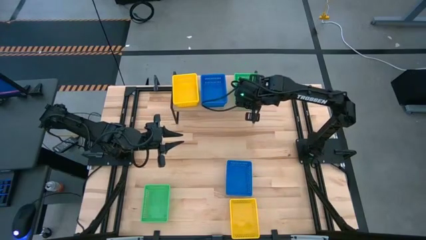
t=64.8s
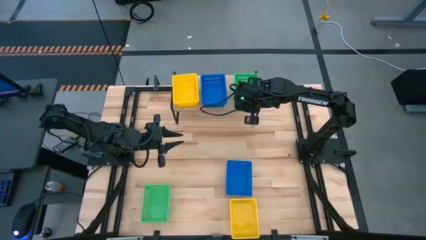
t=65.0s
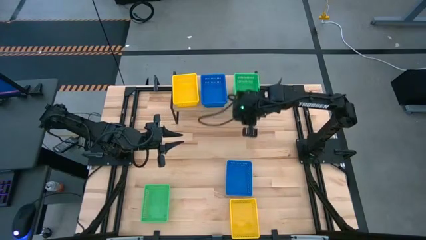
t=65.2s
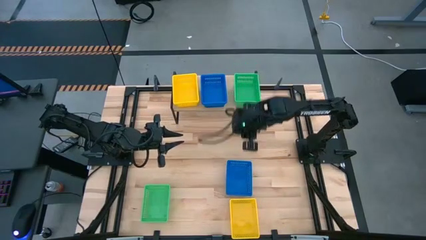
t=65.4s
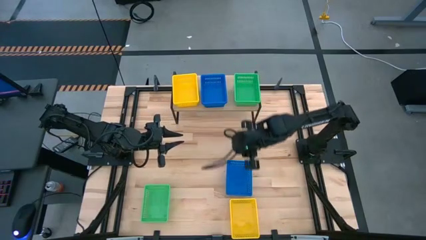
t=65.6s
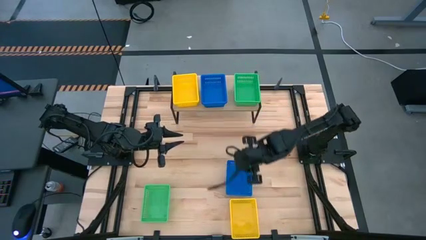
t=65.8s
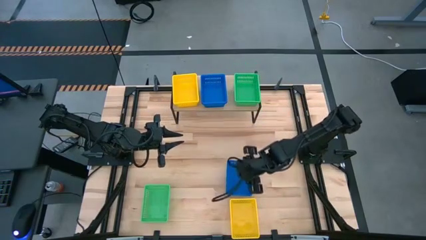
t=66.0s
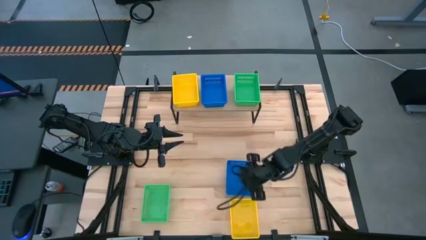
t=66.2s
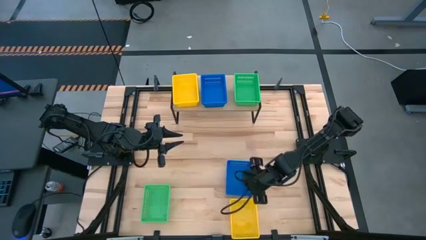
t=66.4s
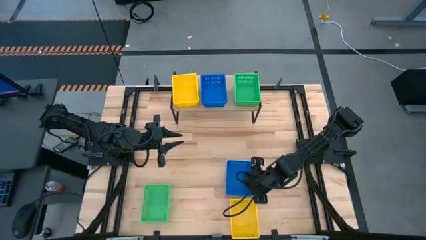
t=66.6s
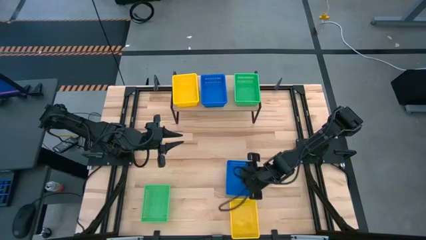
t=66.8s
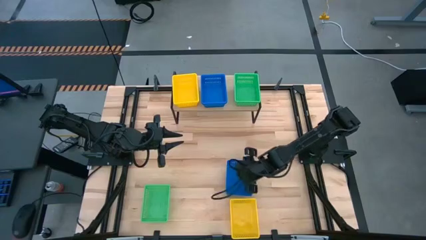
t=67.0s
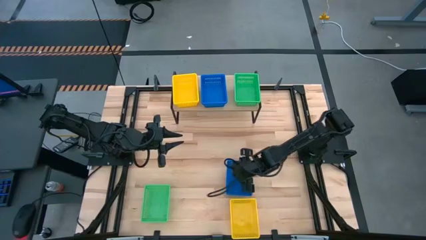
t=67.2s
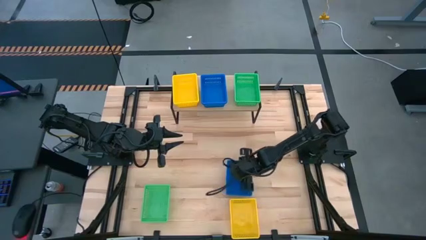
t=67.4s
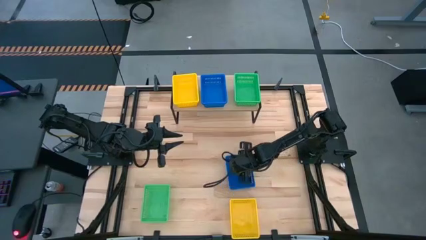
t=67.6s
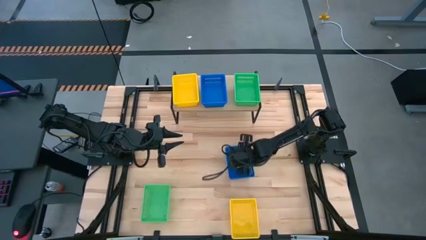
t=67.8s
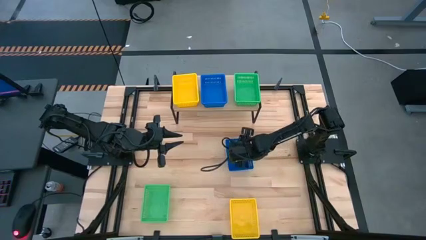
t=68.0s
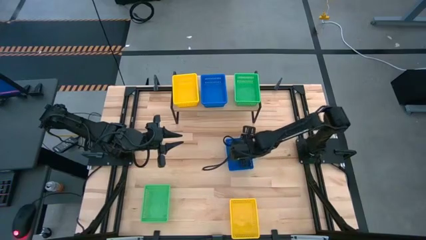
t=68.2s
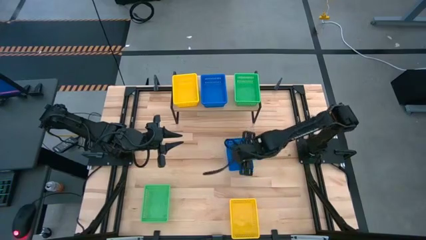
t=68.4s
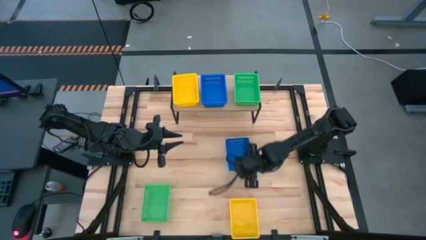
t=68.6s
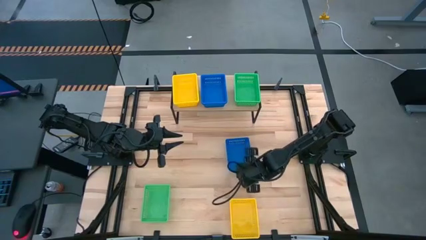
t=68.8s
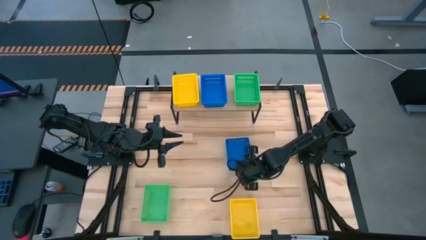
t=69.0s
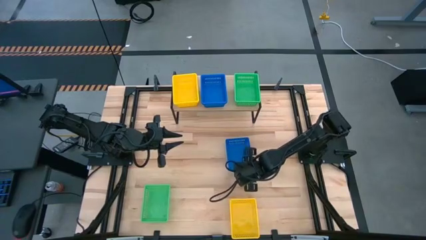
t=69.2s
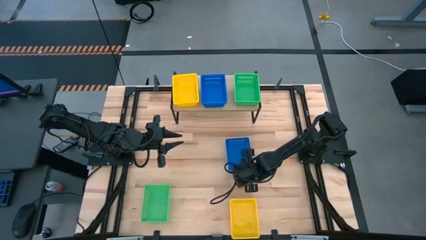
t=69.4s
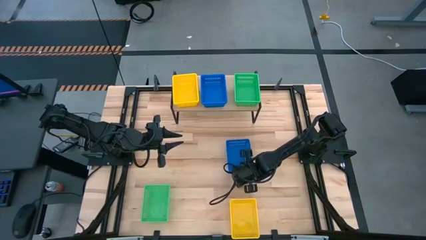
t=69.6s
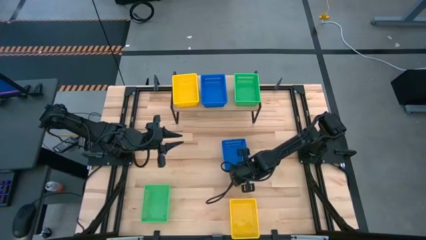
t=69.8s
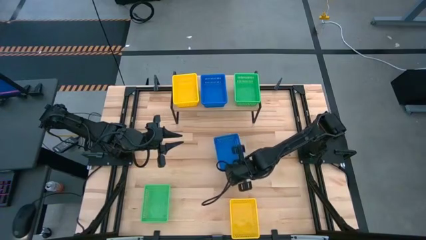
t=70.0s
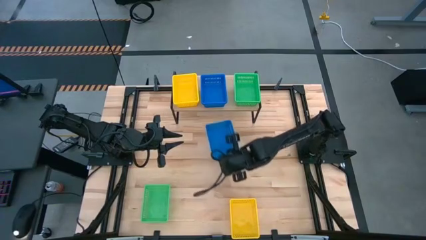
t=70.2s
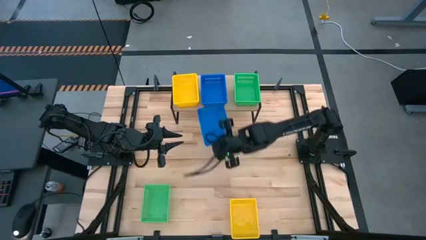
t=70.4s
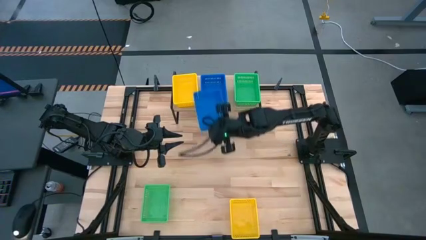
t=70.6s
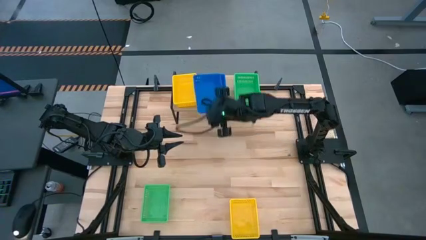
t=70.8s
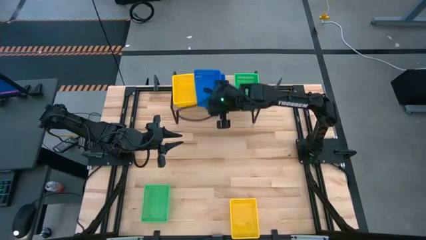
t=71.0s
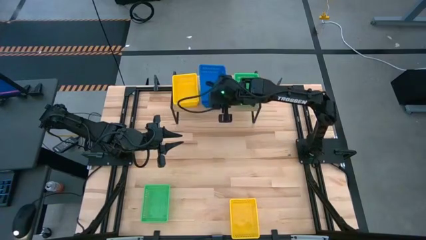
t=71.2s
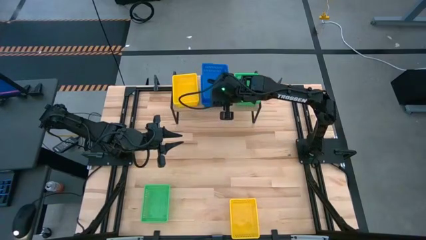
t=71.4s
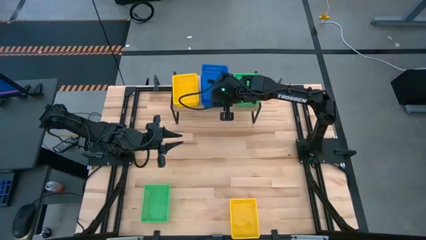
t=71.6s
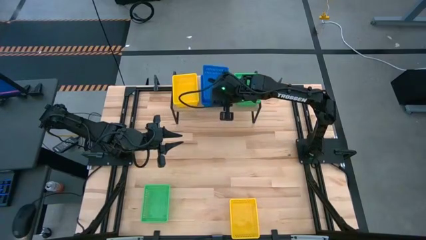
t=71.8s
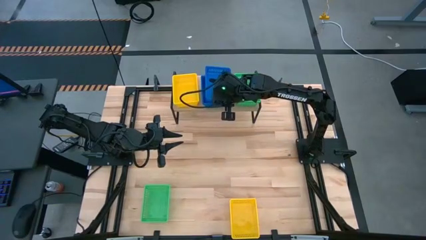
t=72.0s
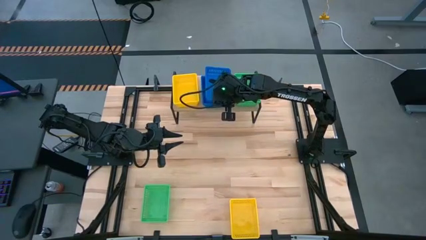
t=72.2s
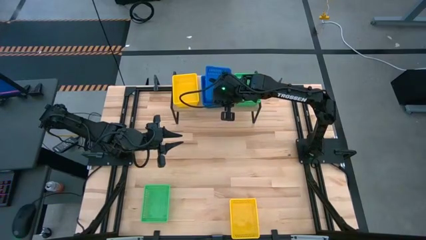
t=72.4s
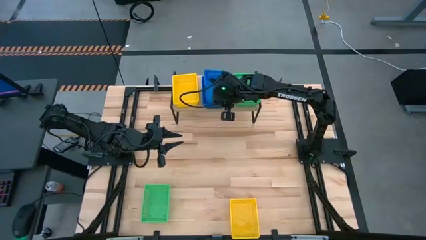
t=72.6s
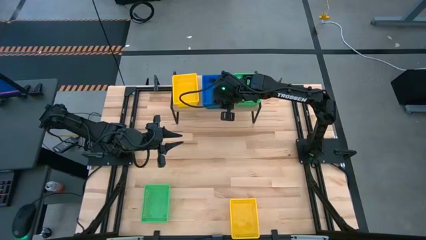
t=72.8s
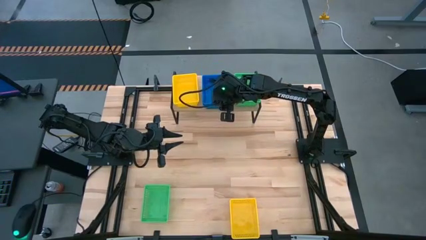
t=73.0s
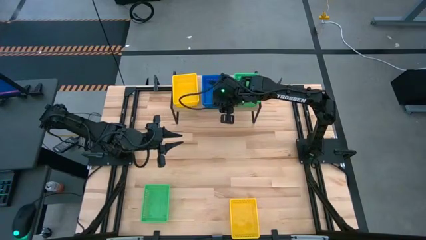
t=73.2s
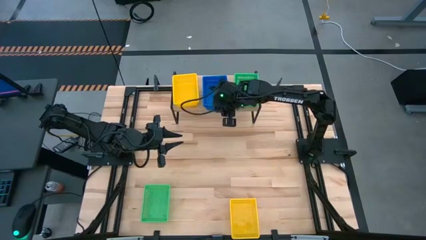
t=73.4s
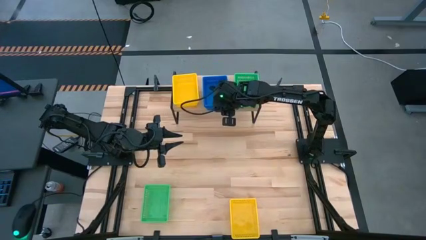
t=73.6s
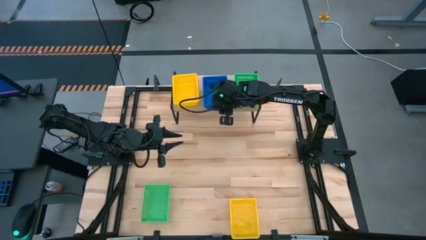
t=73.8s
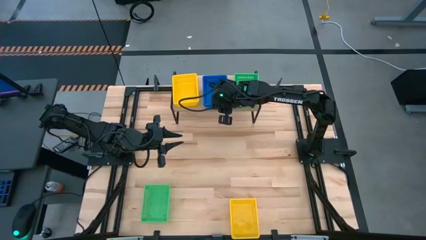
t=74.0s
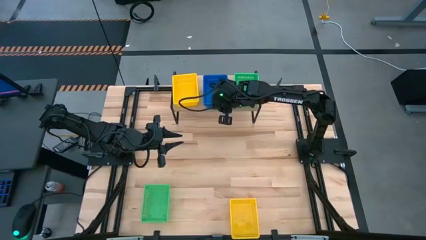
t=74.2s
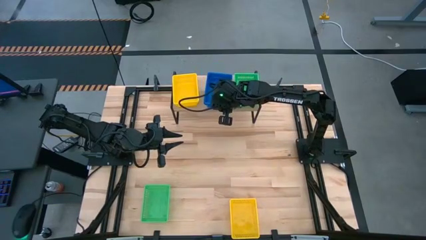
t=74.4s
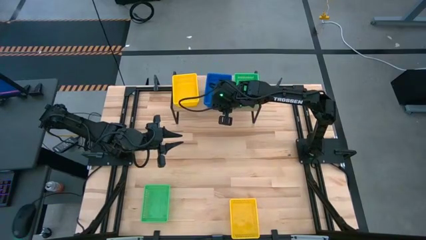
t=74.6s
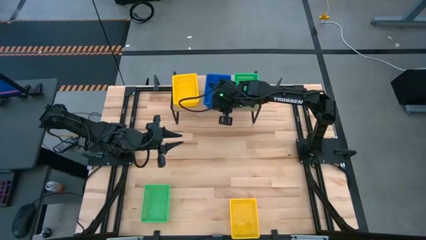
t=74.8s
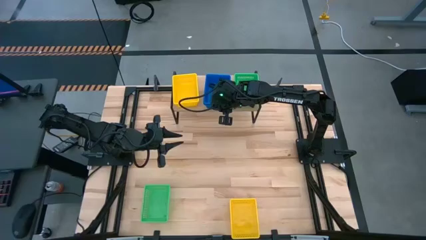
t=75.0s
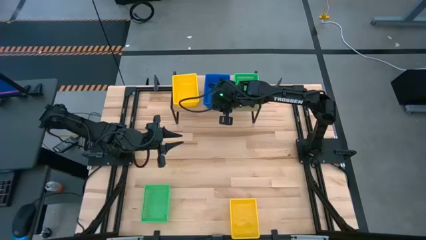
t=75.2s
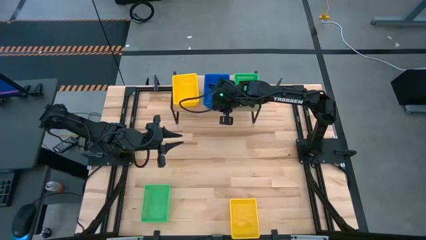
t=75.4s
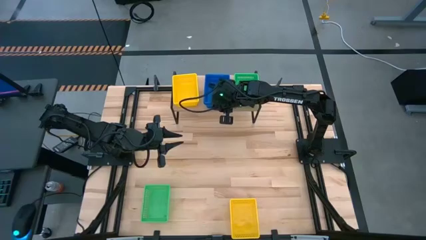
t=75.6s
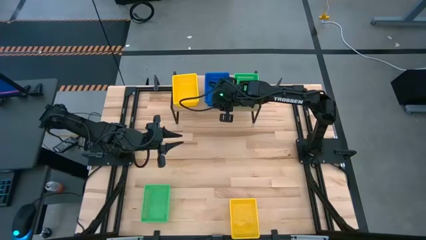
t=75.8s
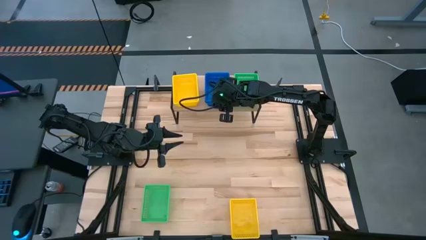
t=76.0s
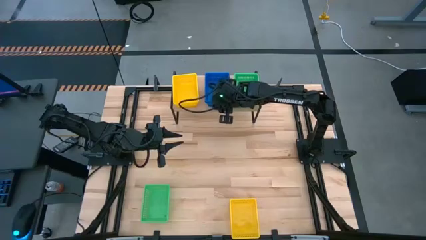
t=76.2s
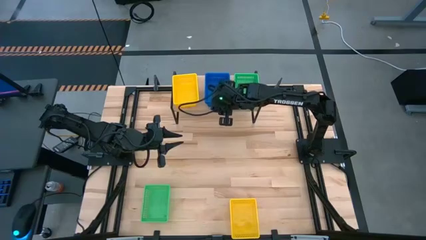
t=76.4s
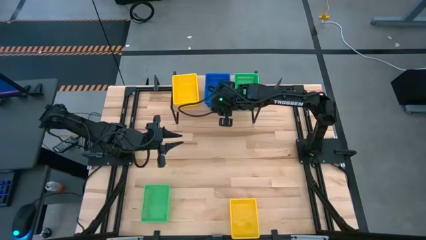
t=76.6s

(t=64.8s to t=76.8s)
Task: Stack baskets on shelf by color
Stack the blue basket on the other blue baskets on the shelf

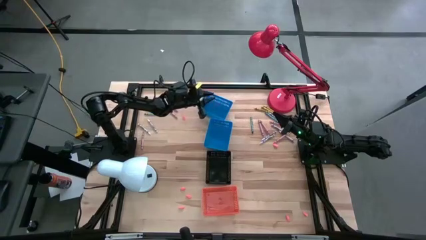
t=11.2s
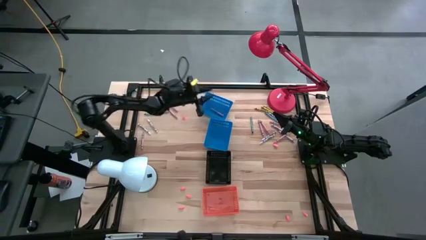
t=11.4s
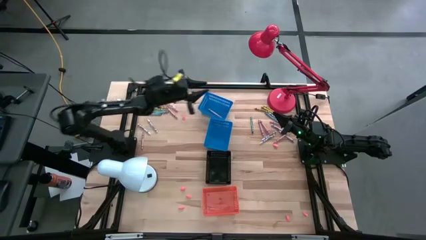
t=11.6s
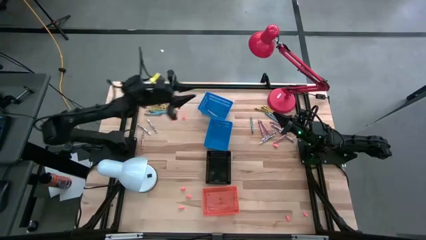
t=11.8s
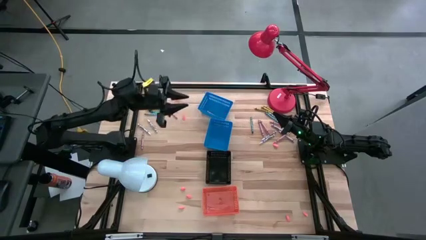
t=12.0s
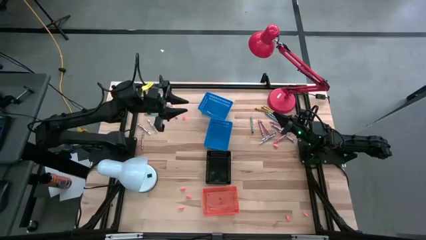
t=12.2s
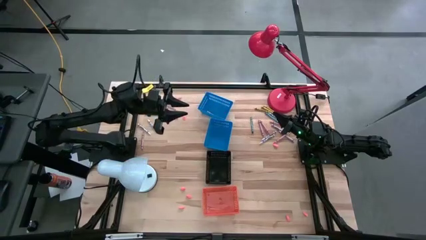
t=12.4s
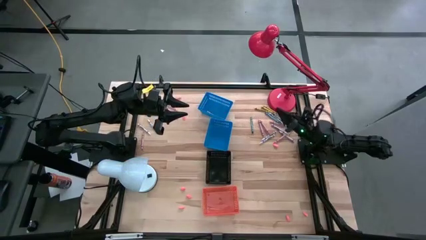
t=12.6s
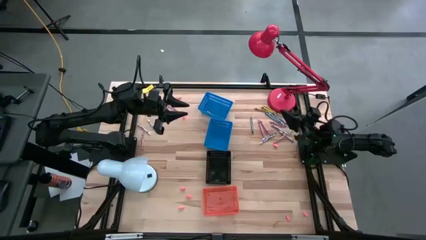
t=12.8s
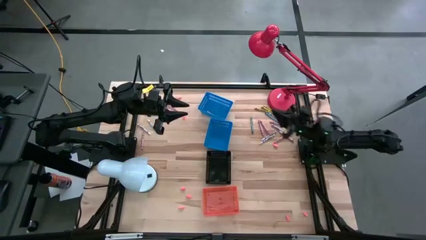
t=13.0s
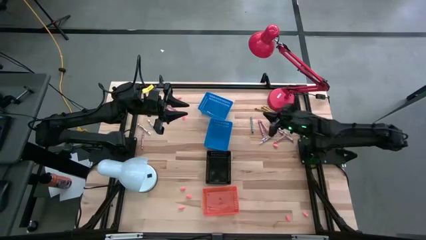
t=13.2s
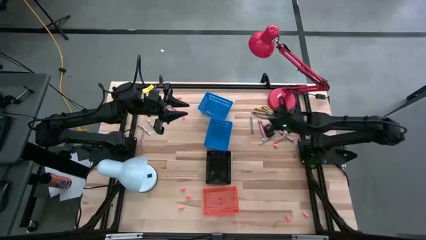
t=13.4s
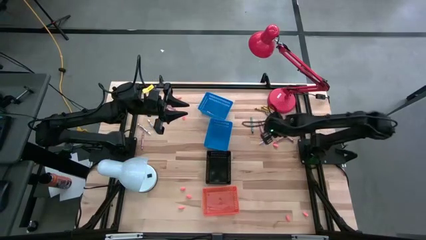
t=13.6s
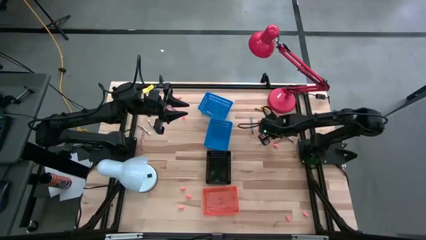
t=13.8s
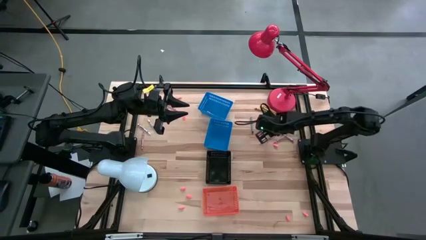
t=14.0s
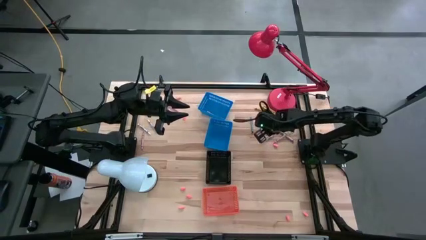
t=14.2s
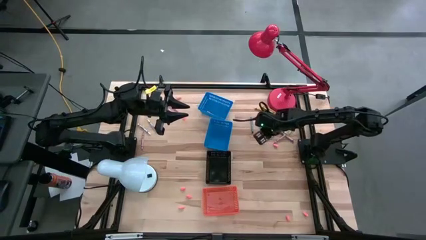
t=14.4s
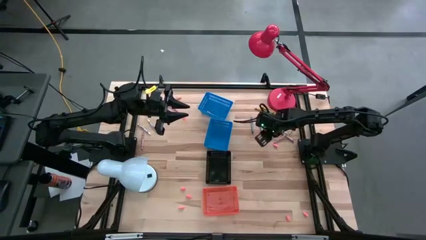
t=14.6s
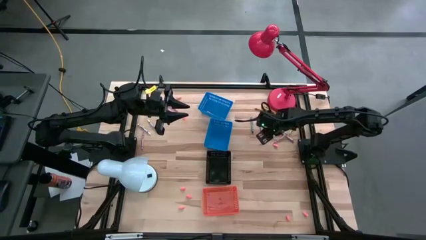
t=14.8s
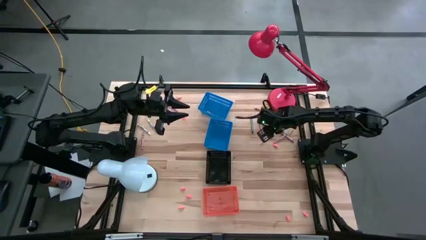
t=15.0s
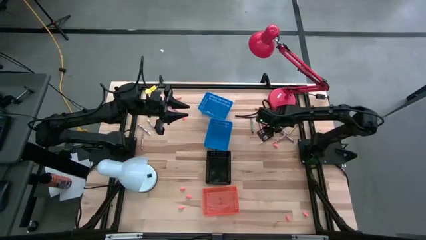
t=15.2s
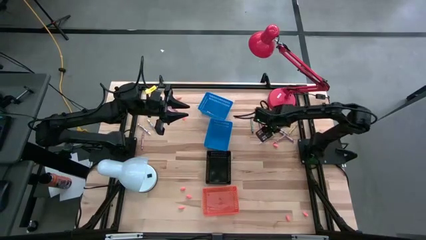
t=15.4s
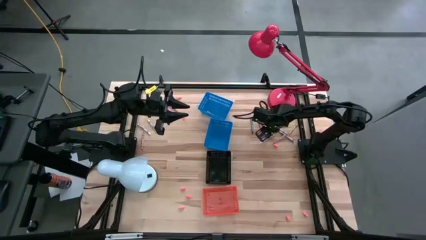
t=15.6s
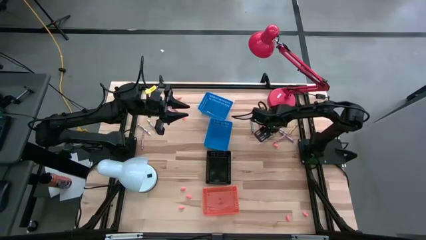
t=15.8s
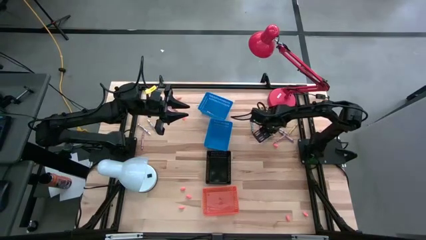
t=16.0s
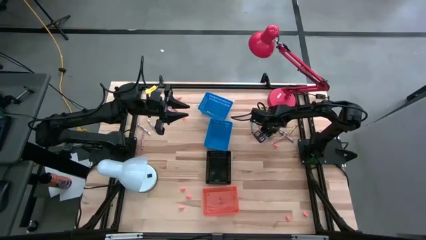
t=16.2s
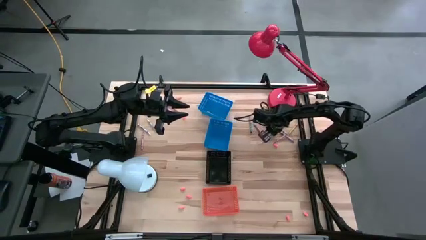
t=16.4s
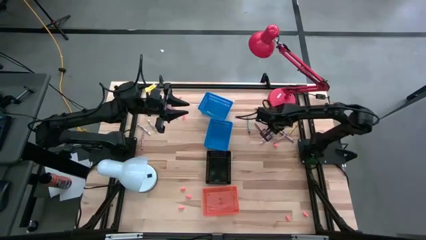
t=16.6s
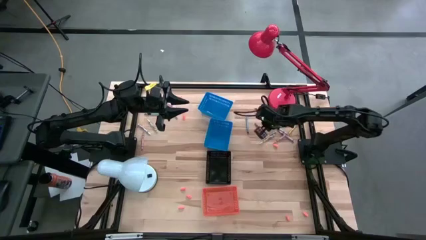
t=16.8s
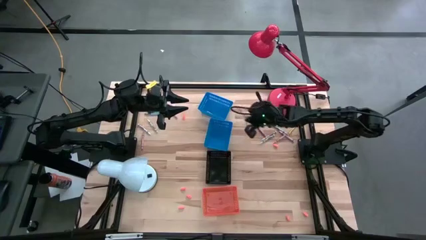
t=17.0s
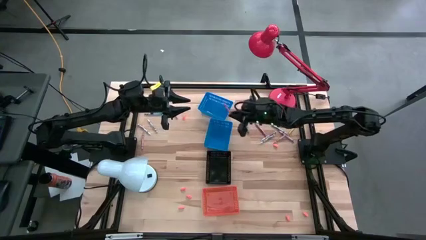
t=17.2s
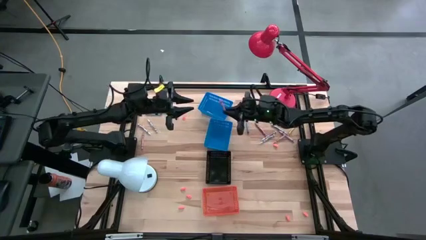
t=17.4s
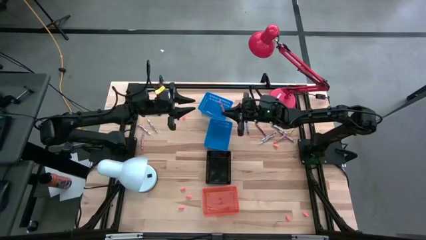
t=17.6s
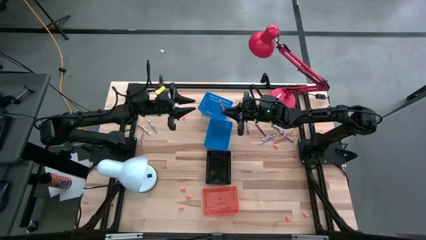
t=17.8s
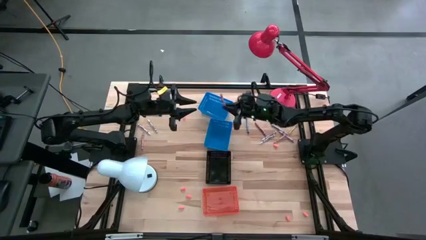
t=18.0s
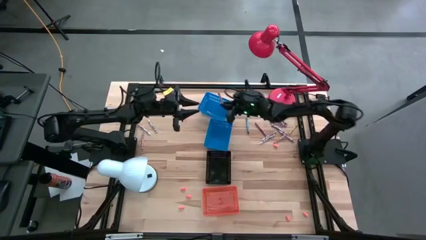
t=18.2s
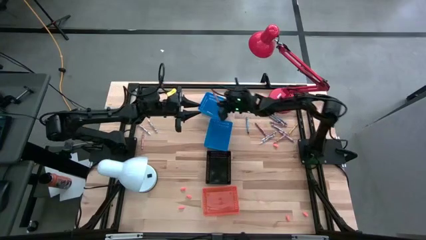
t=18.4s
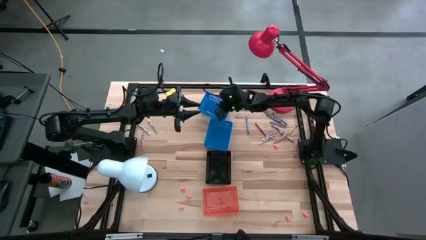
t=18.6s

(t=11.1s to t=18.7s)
Task: Sort crayons
Put the pink crayon into the top blue bin
